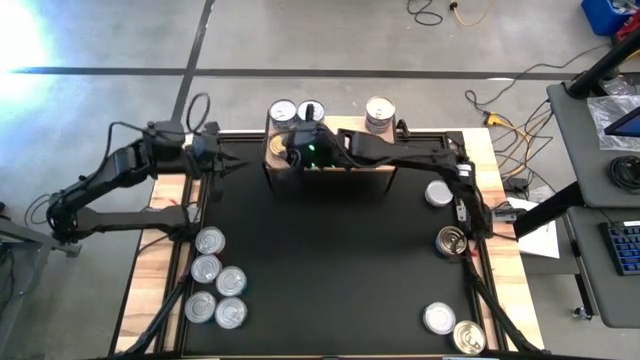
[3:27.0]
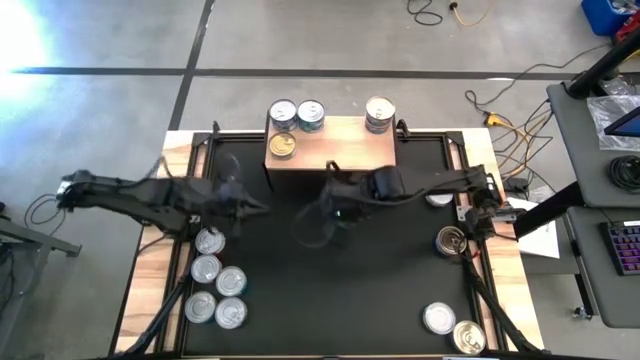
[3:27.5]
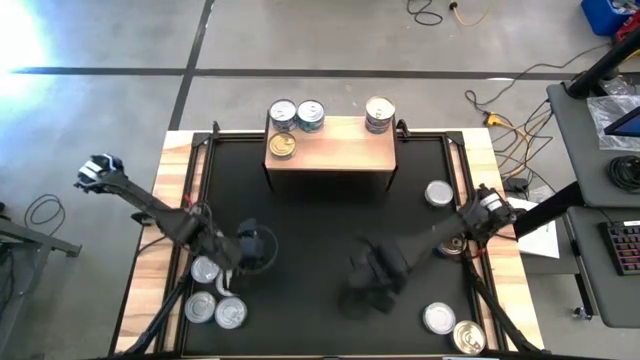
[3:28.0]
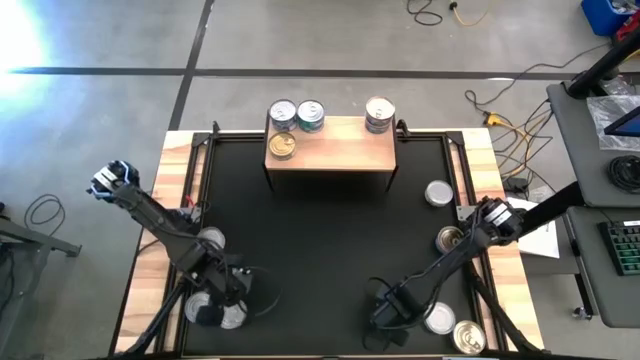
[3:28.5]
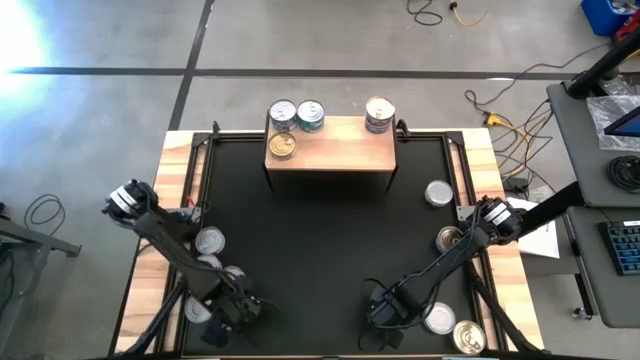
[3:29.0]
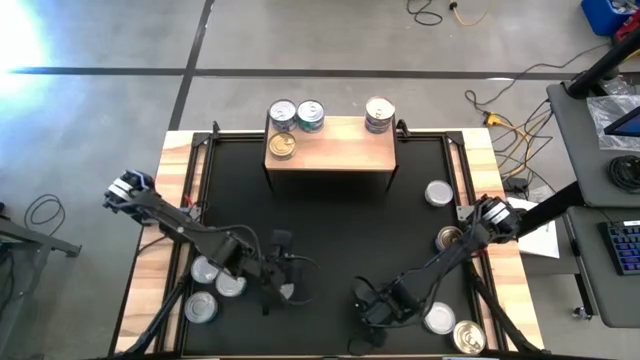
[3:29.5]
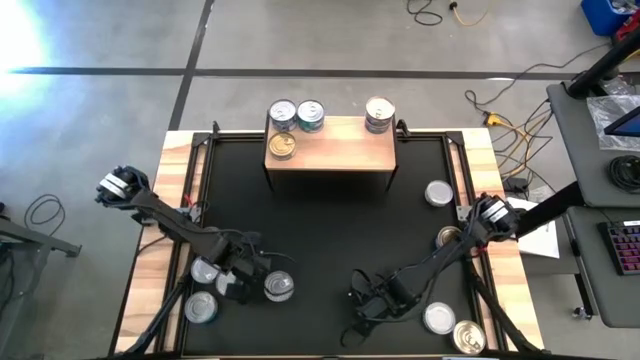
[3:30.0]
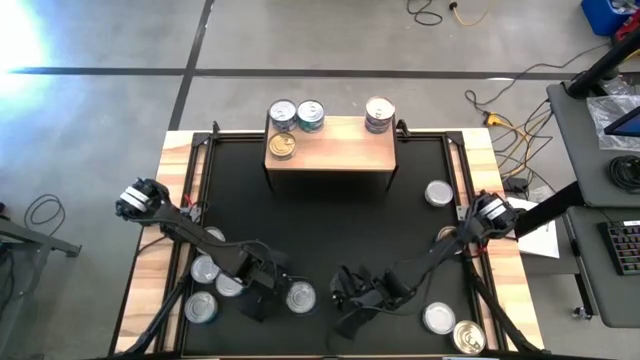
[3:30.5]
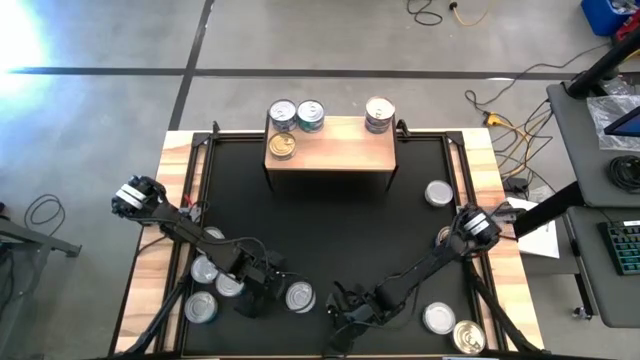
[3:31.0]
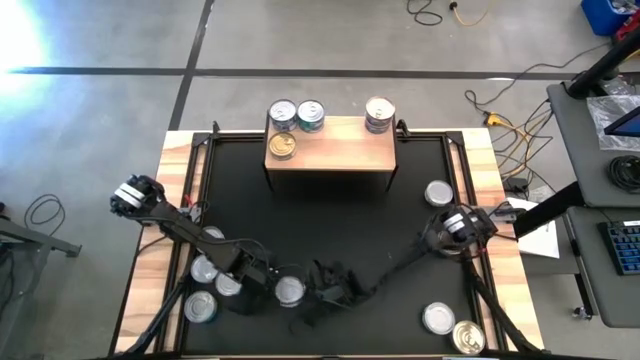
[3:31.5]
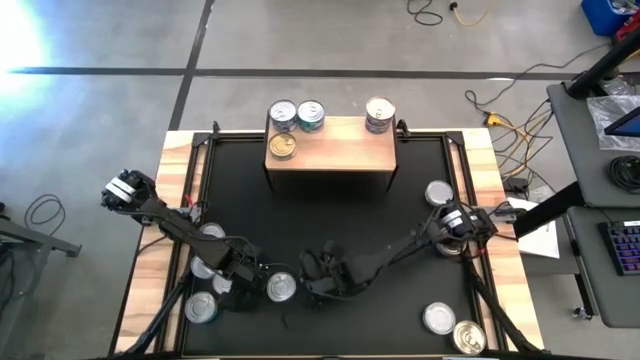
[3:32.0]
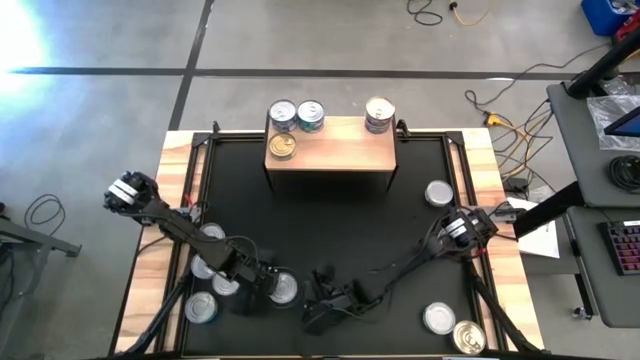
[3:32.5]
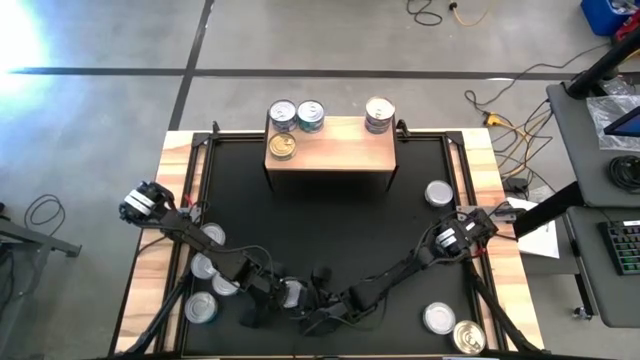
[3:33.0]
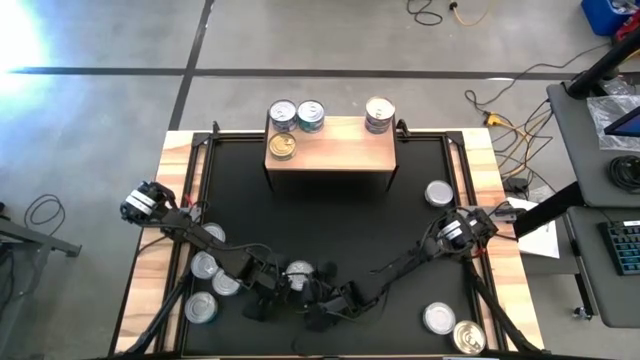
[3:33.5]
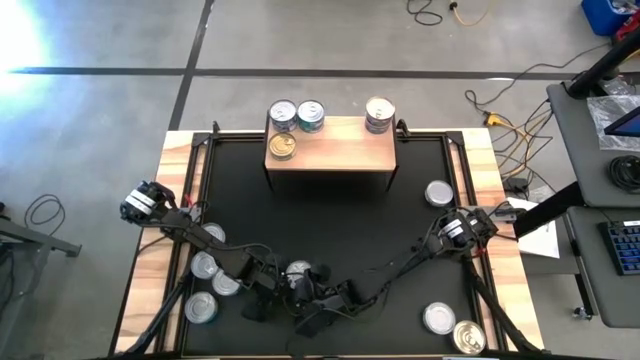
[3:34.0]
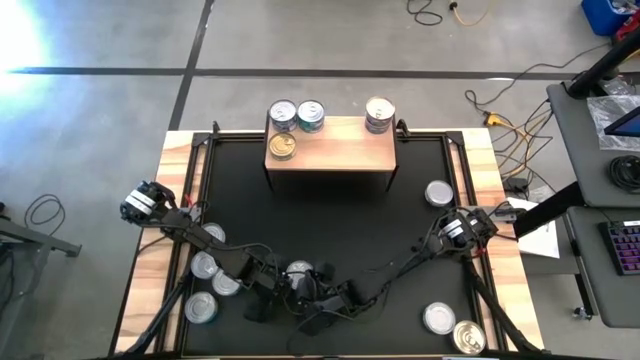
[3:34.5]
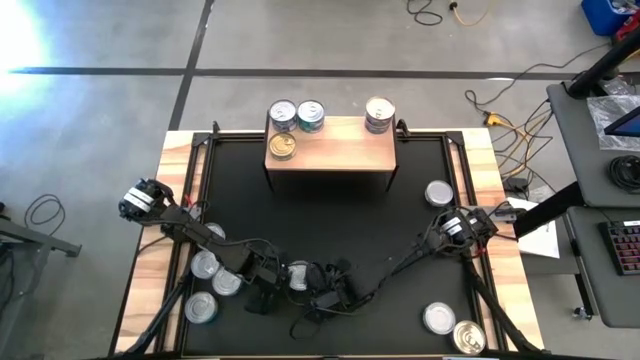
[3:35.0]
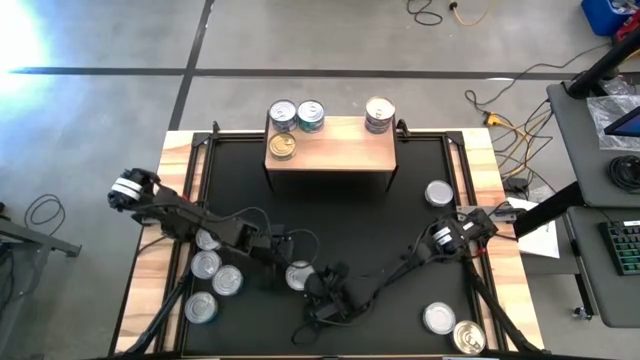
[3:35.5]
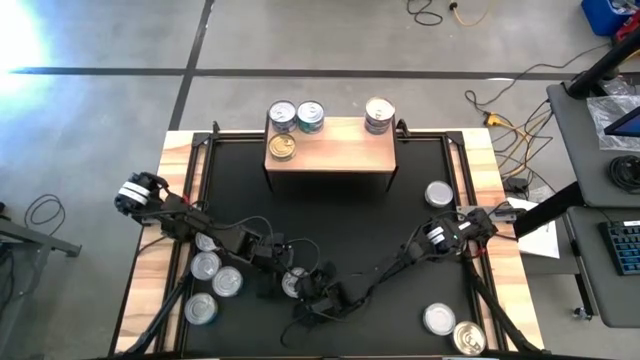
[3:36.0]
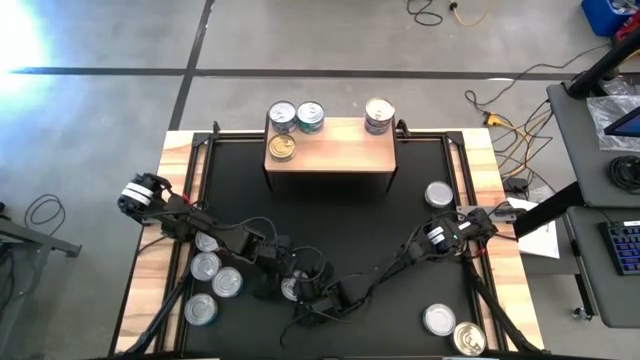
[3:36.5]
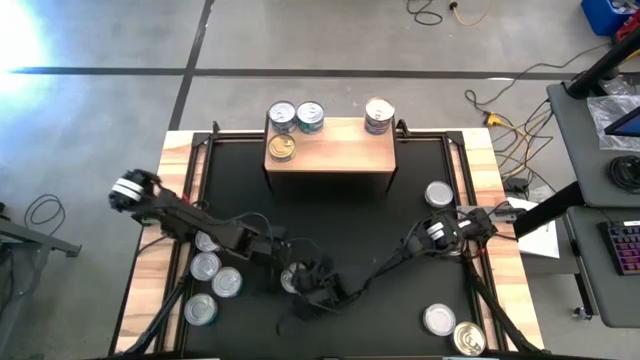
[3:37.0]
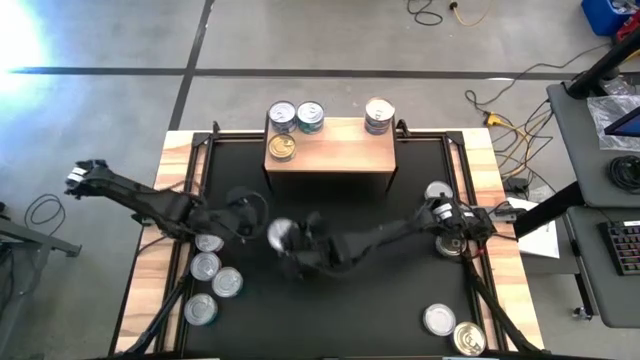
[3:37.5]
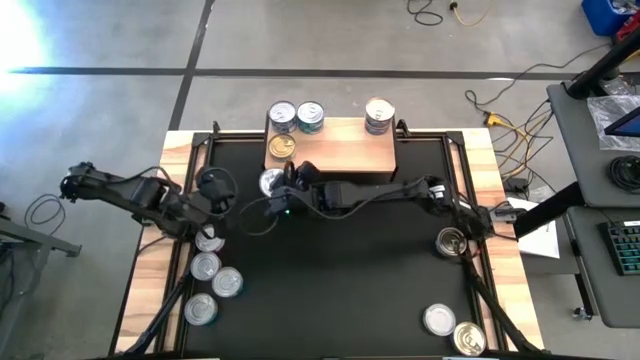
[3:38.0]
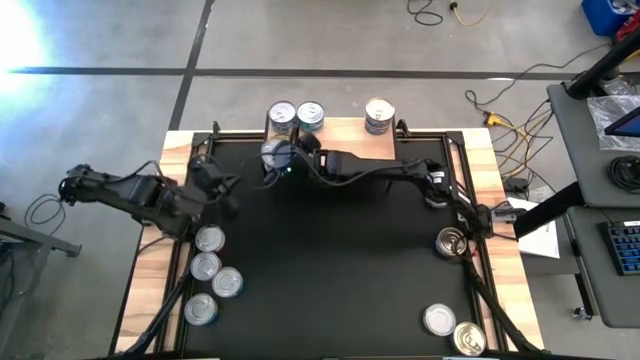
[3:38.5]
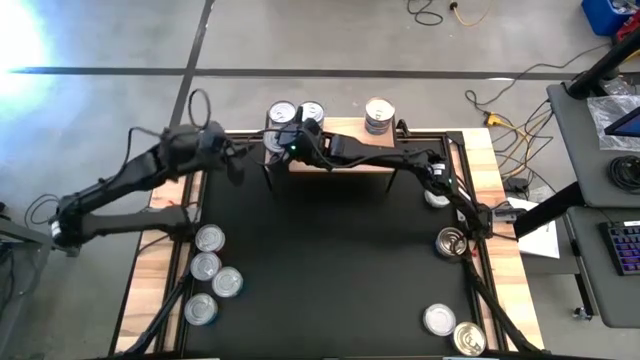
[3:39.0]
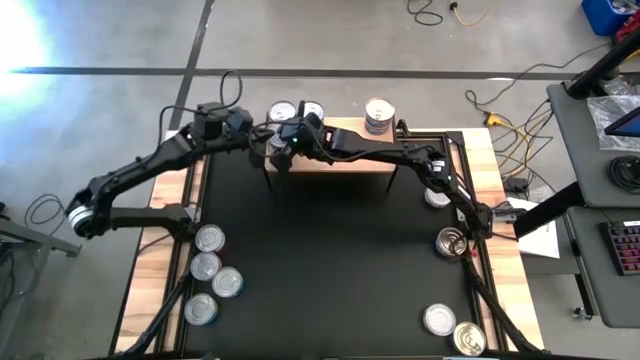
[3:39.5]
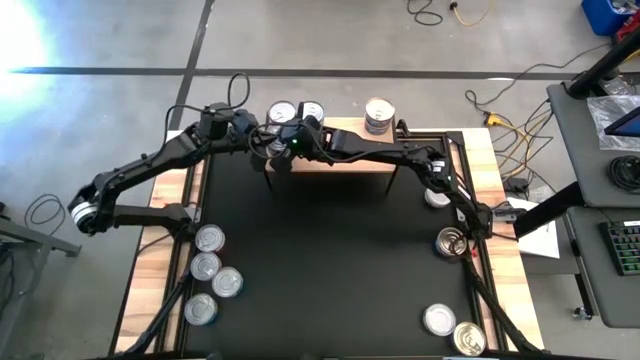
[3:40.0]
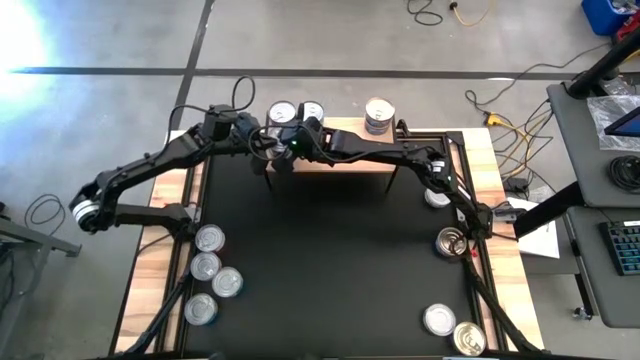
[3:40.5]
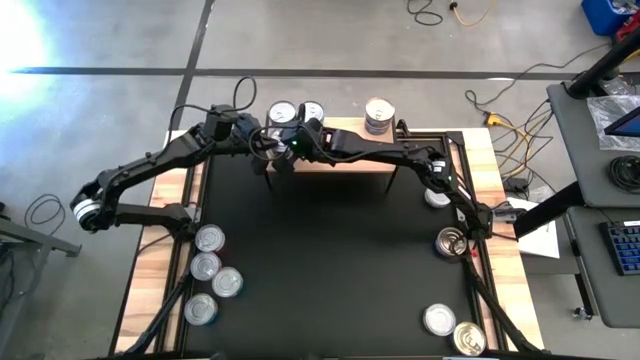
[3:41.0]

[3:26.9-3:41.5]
Task: Stack canned seafood by type on shelf
Stack the green tuna can on top of the green tuna can

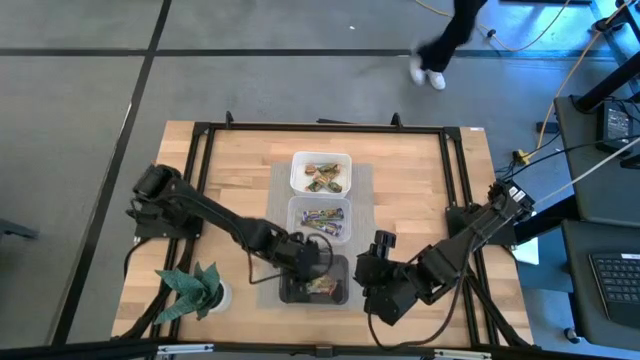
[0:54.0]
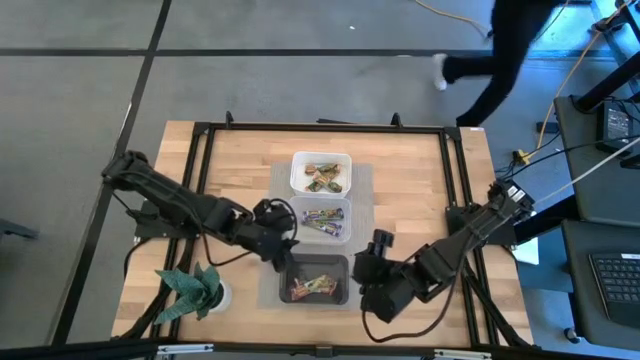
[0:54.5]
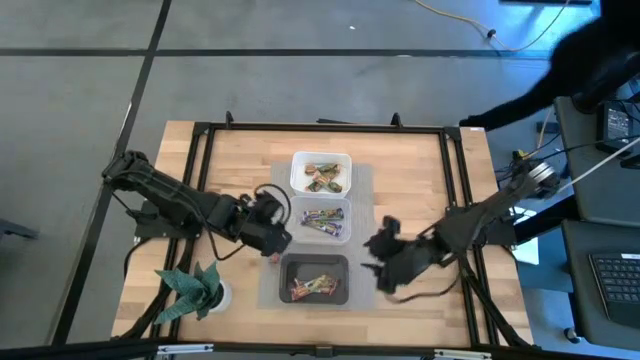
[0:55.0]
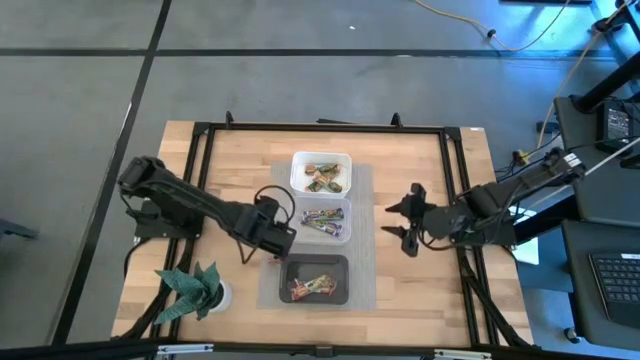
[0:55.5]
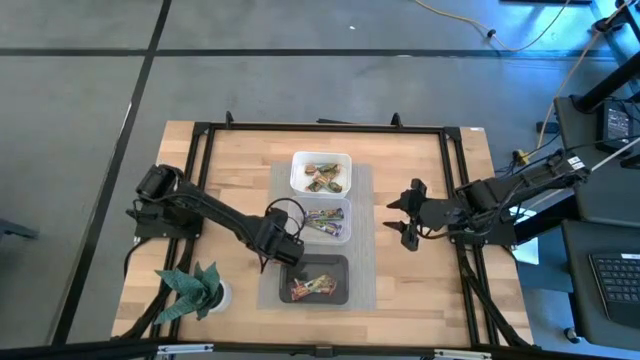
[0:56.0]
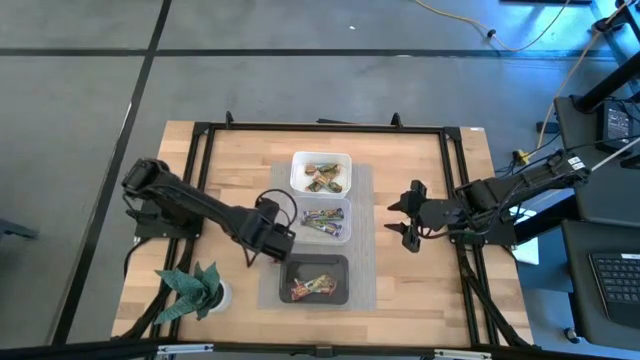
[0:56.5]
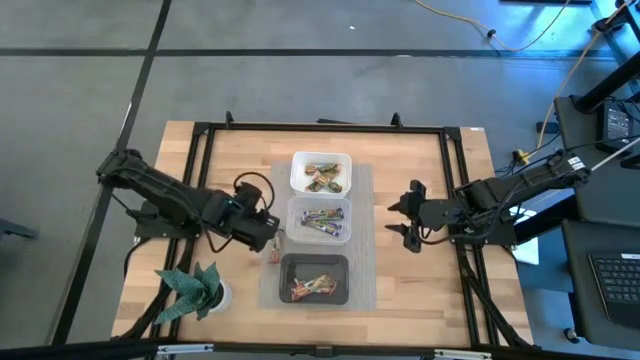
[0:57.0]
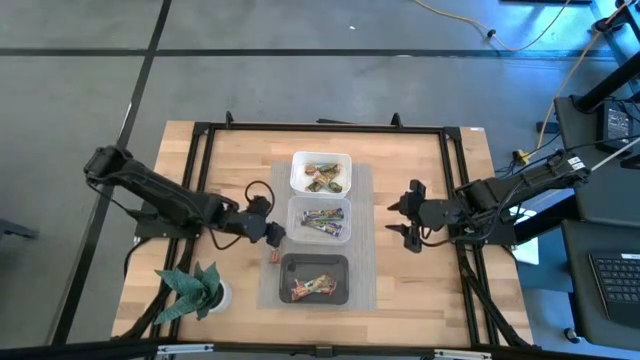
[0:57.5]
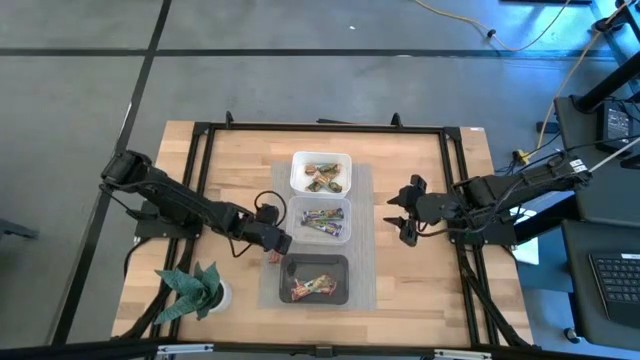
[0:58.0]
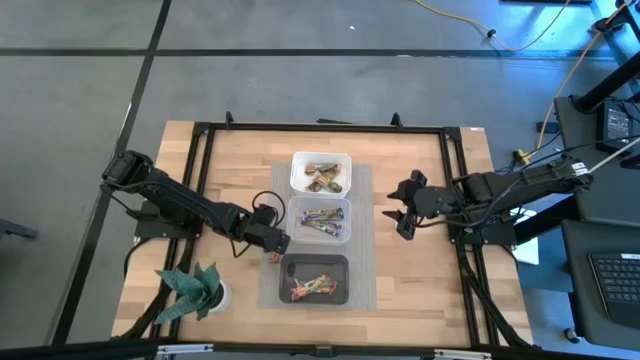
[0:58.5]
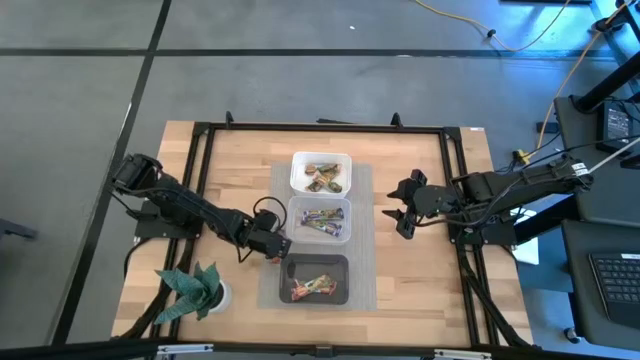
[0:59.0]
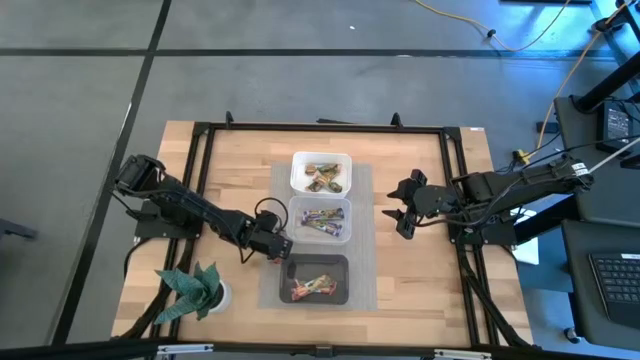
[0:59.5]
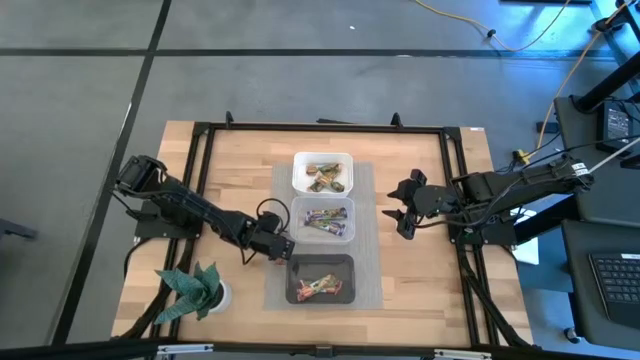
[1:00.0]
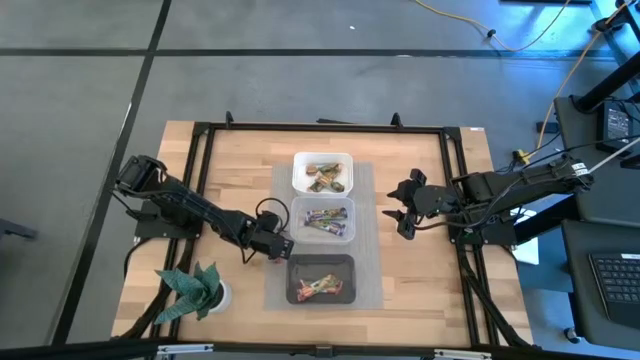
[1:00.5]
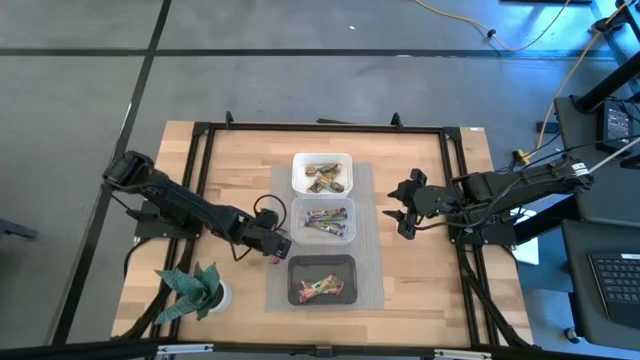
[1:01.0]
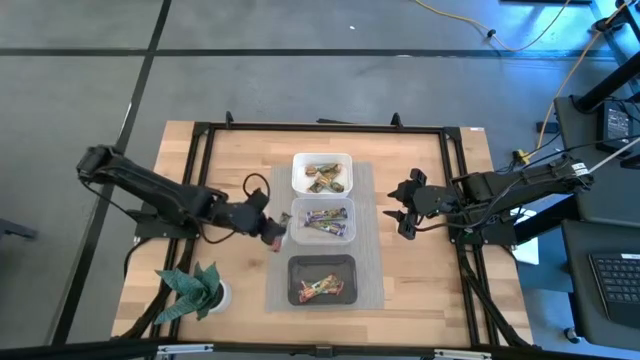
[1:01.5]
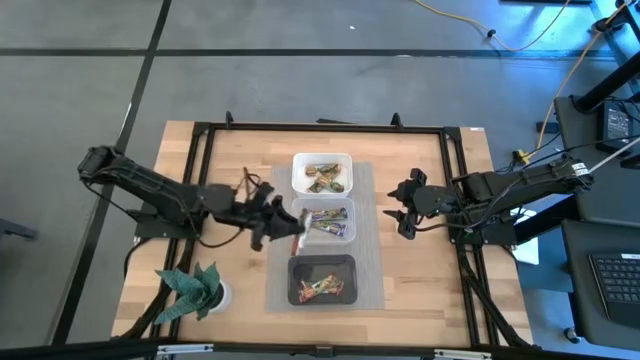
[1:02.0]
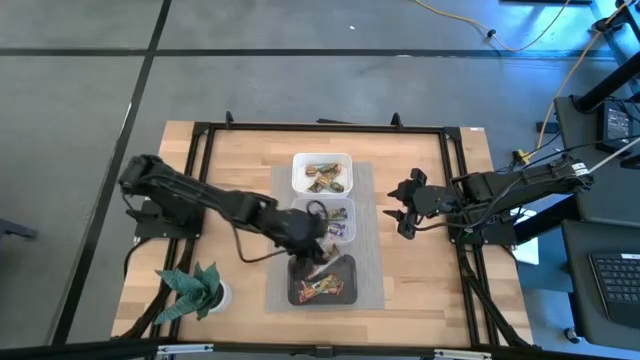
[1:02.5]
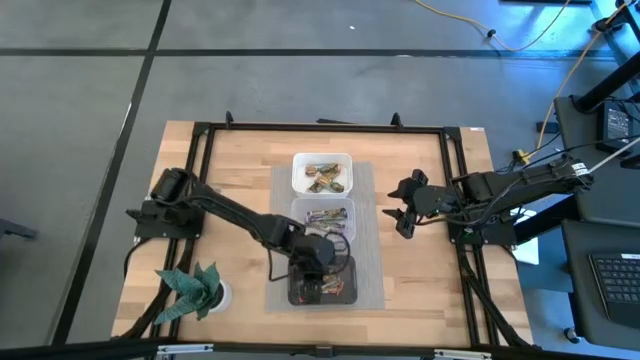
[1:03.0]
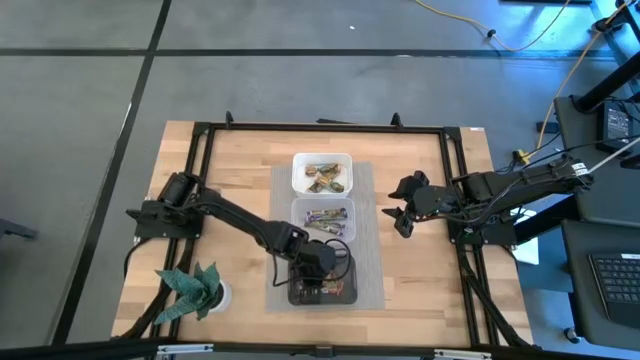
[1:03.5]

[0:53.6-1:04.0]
Task: Pick and place Granola Bars by type
Put the red granola bar into the black bin
